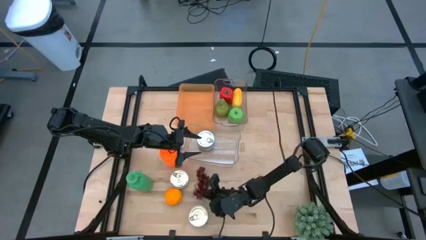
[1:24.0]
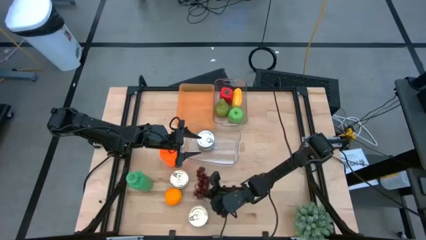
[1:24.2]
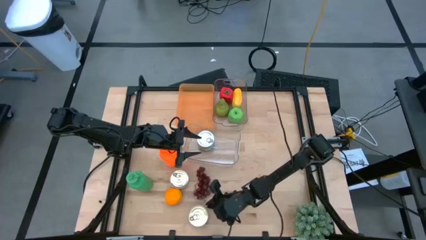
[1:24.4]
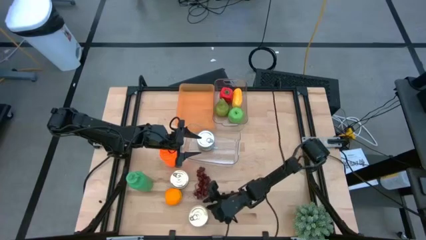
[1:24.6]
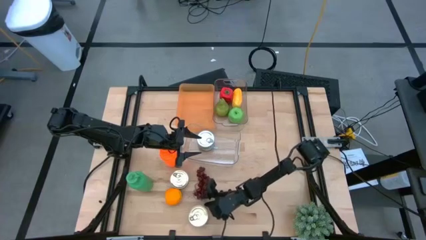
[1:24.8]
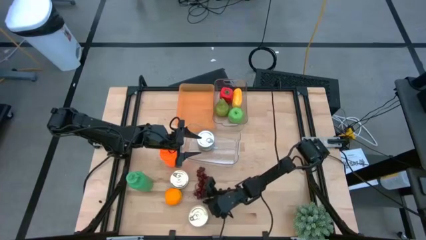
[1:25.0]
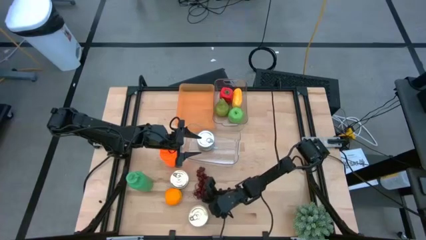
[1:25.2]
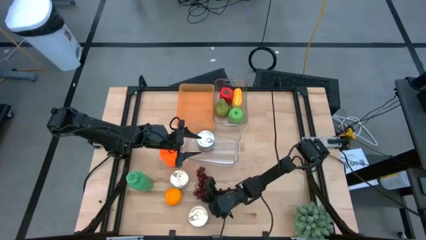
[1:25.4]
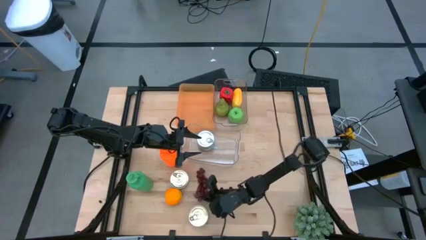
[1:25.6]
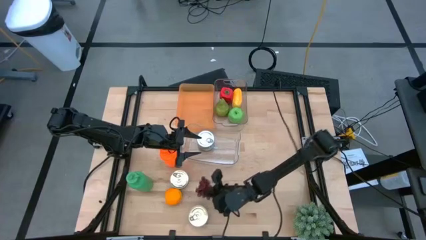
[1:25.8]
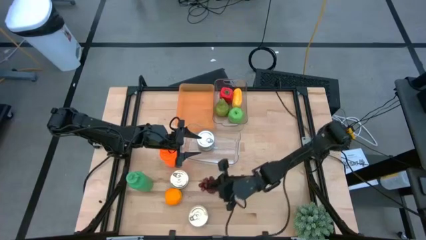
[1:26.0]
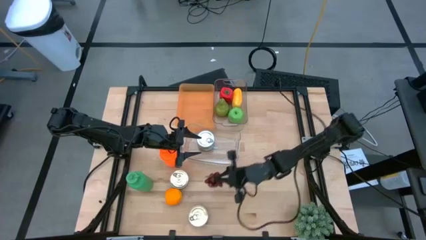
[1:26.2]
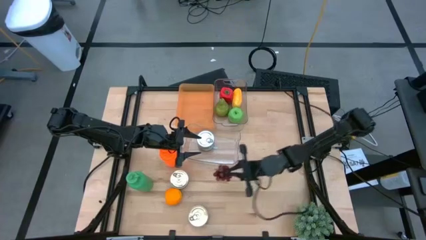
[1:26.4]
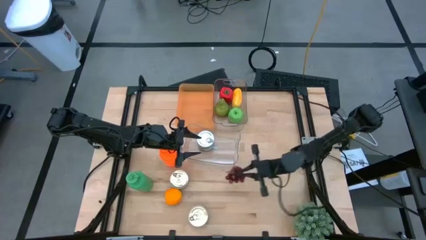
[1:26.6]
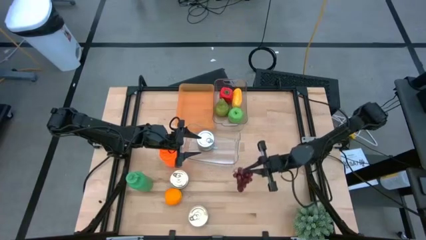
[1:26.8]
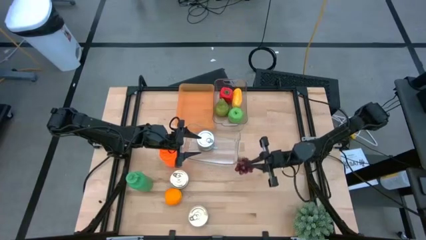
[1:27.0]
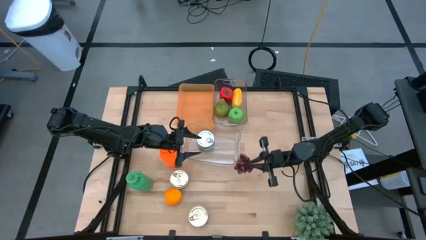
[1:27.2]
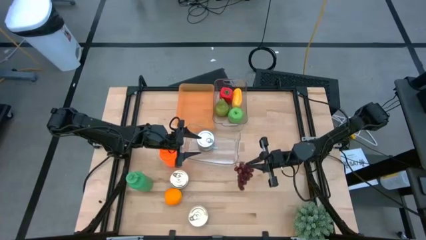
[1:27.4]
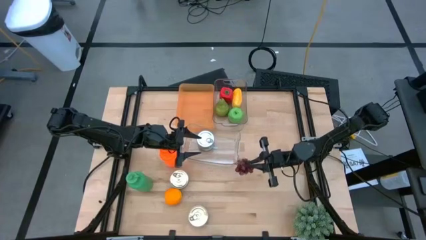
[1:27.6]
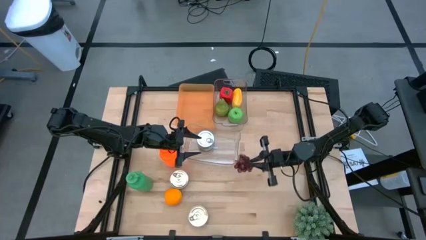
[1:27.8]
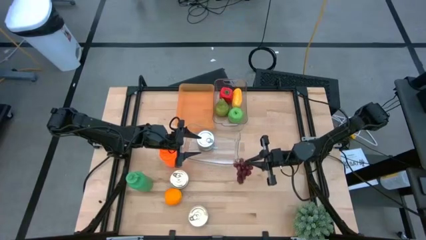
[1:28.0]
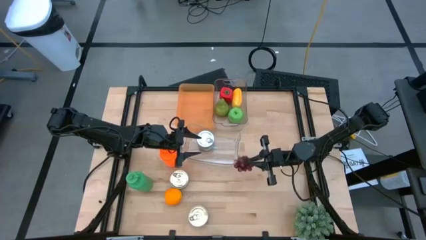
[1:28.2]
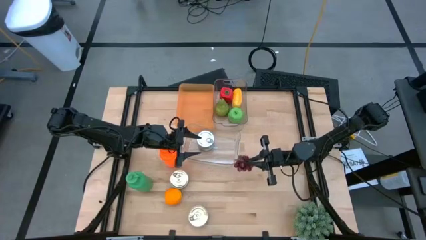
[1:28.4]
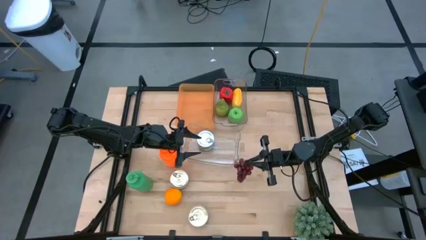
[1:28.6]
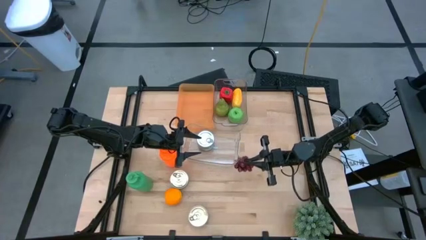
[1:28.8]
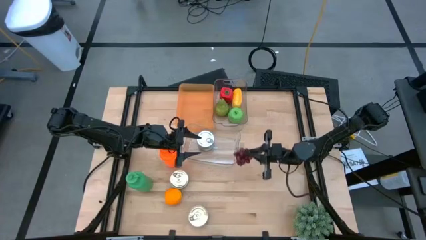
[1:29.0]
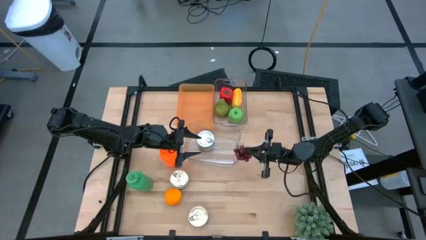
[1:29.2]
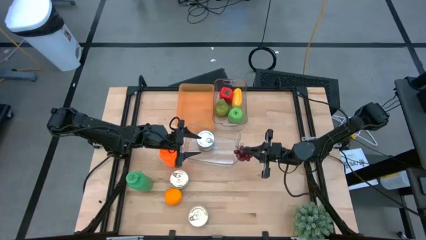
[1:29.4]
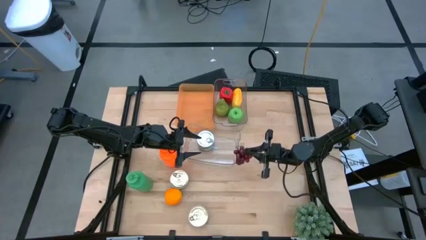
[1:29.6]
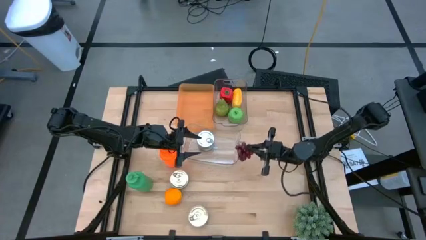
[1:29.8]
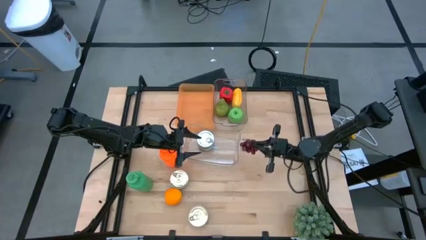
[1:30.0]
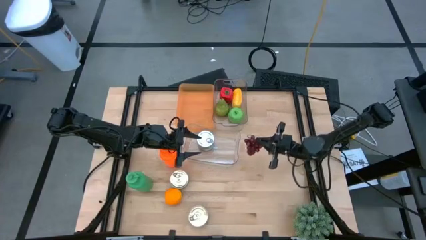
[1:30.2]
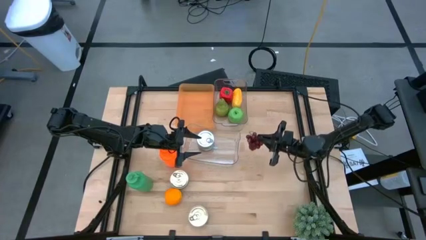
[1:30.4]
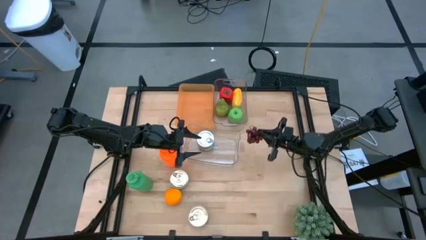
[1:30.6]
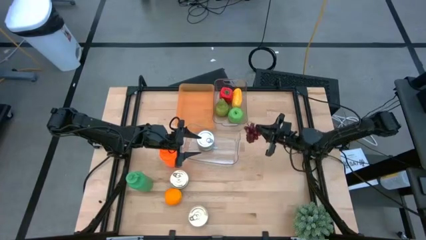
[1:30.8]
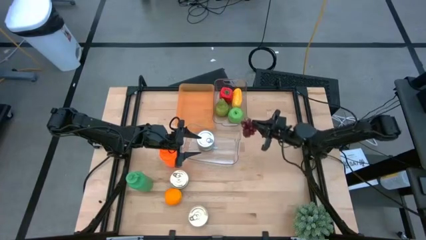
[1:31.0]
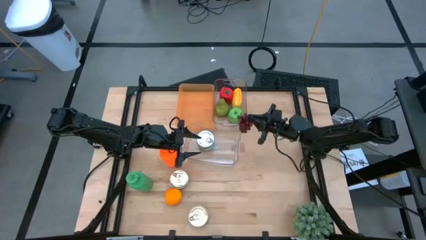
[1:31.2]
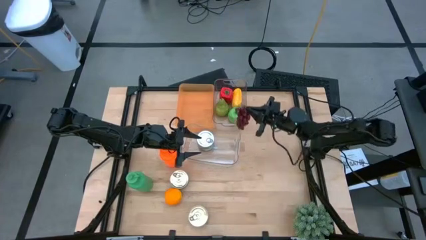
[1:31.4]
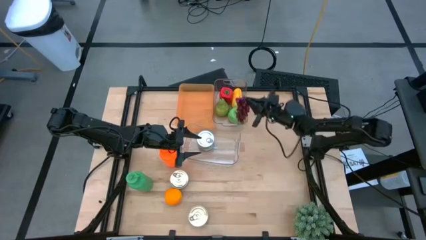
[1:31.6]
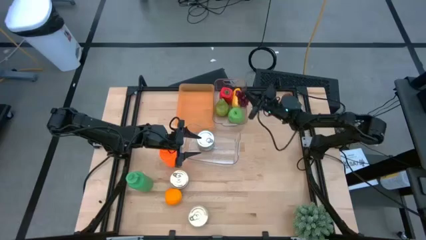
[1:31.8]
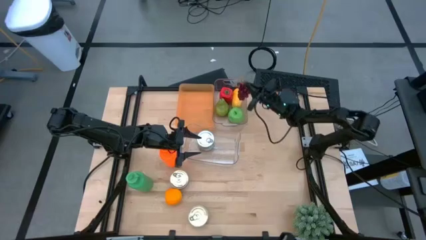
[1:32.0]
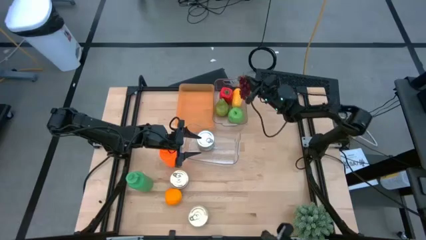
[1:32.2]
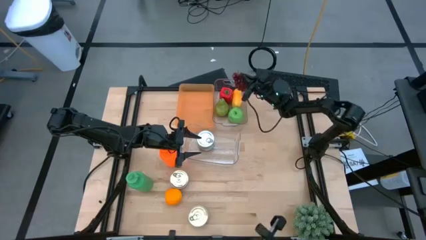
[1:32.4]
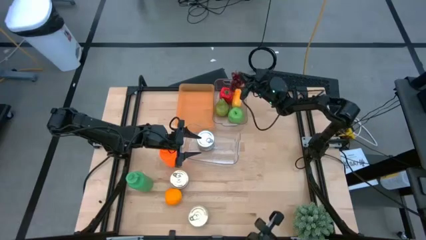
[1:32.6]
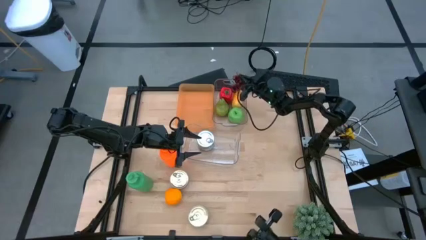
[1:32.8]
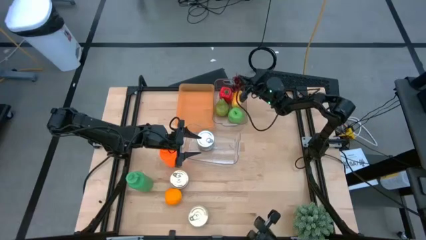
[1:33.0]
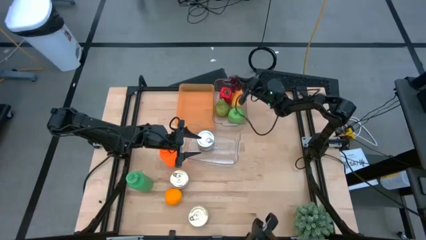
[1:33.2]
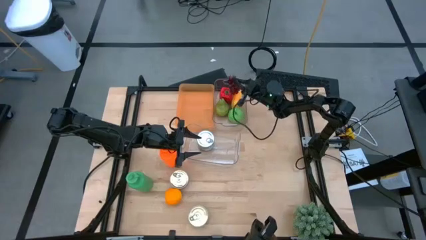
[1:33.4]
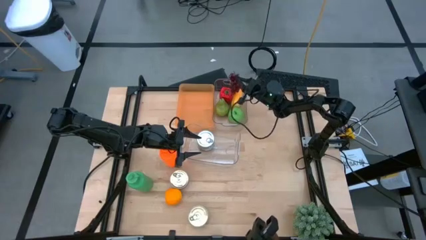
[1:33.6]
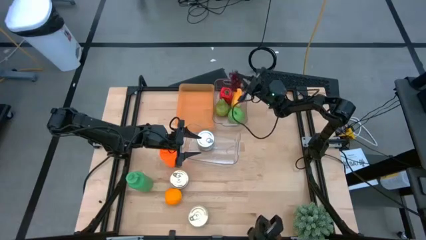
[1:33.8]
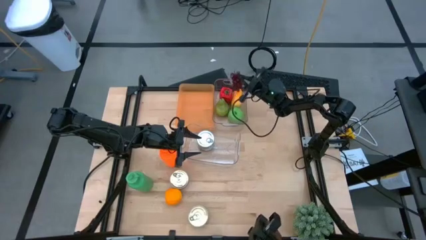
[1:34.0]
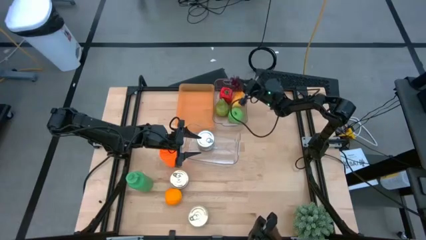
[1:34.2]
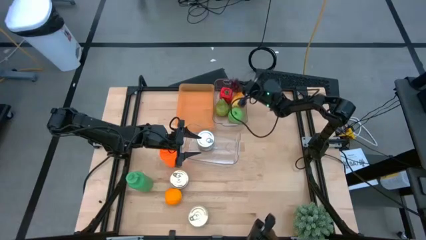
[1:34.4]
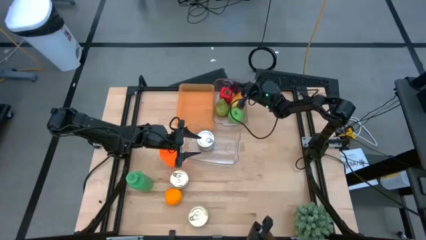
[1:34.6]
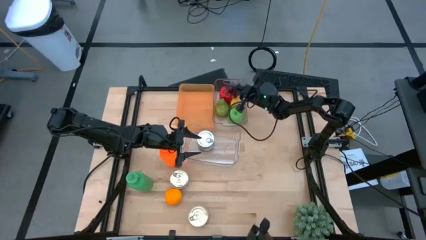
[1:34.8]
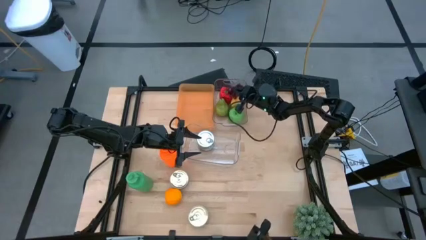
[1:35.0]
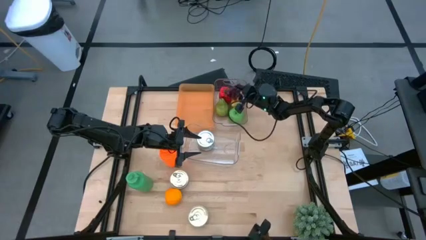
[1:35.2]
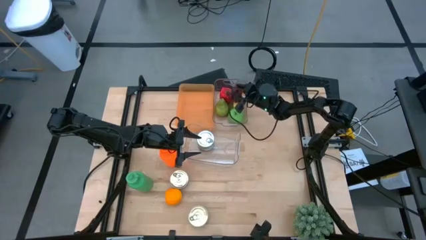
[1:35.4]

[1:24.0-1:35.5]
Task: Pick & Place Food Item
Put the grapes into the top transparent bin
